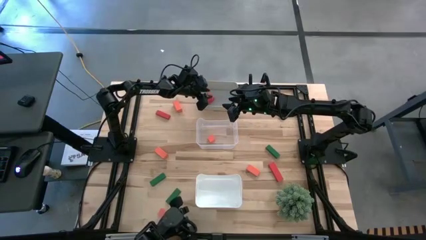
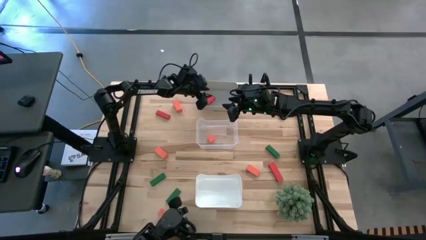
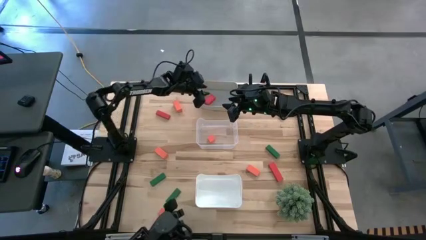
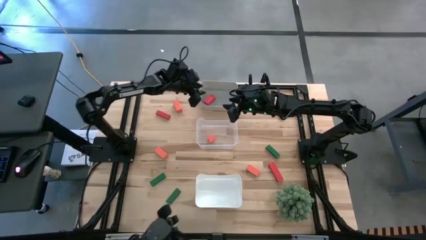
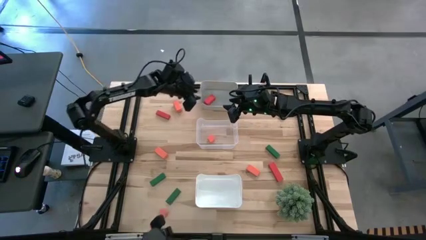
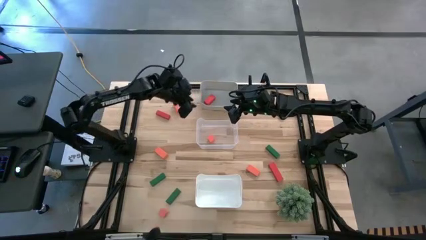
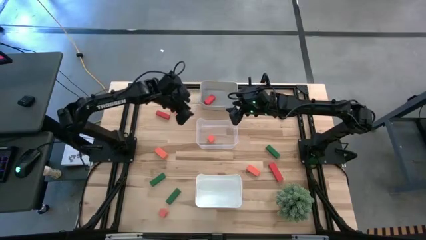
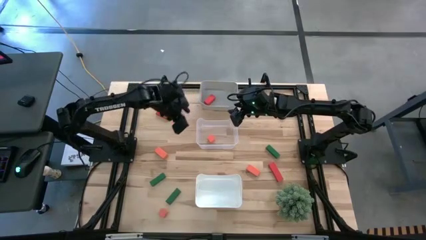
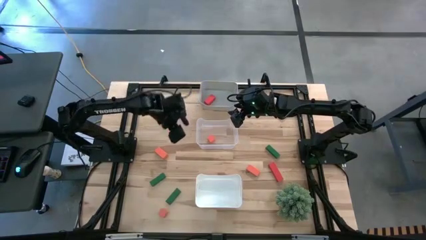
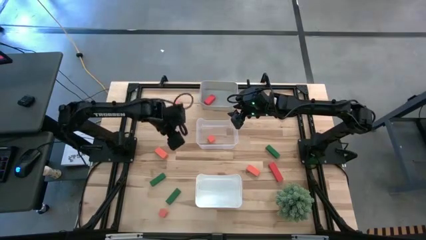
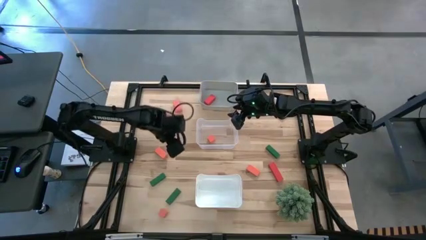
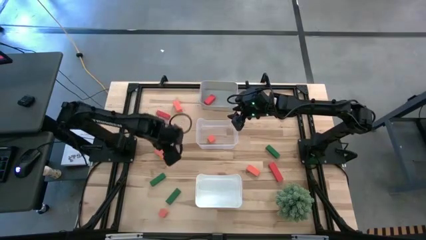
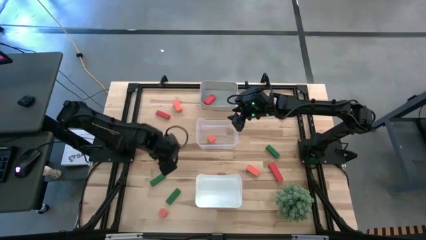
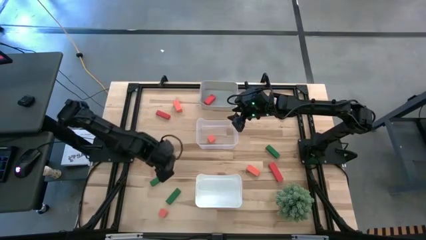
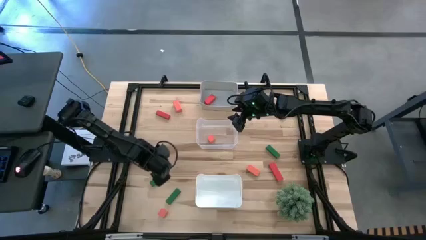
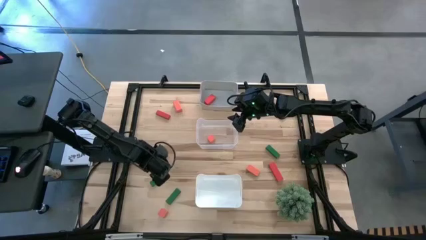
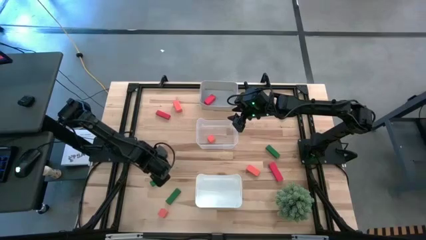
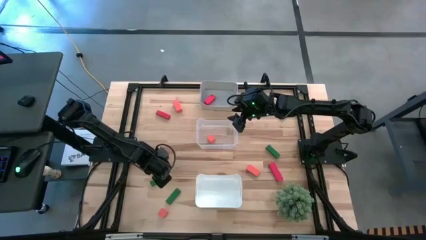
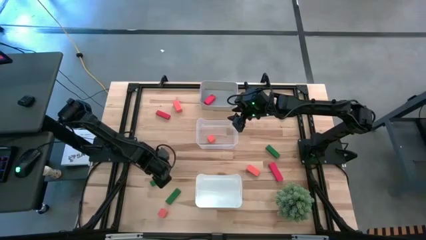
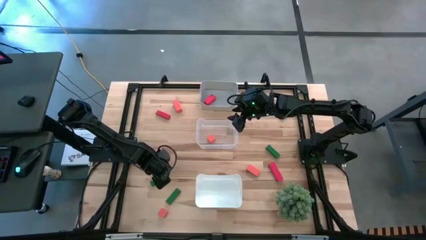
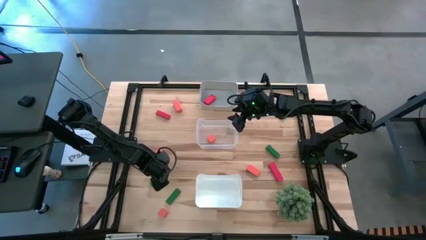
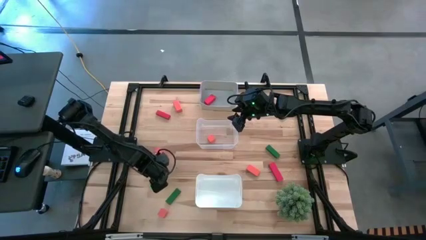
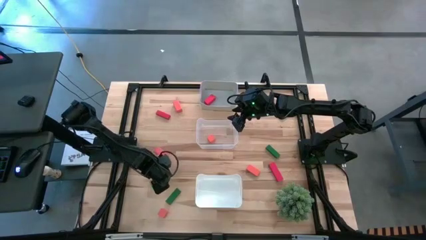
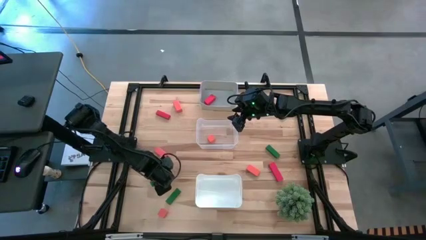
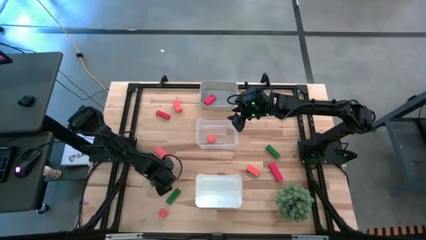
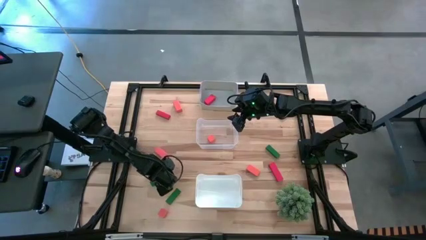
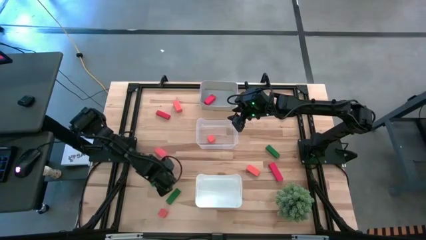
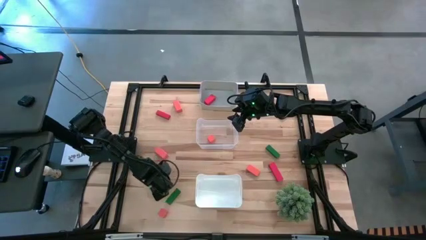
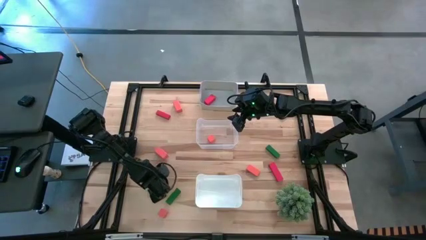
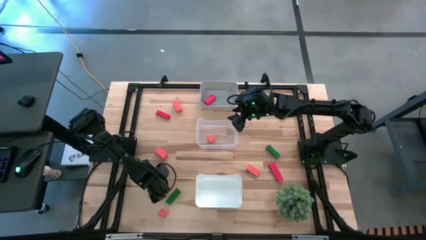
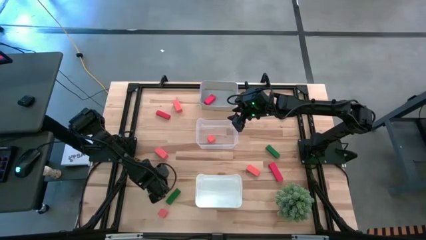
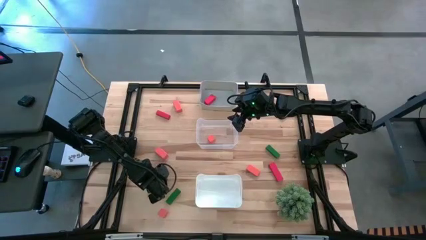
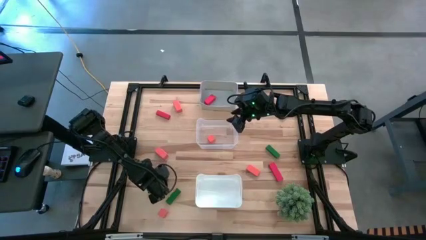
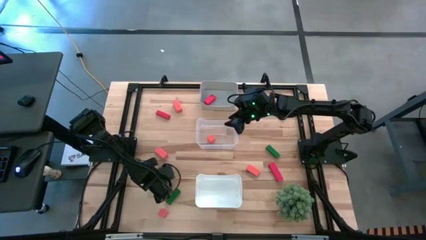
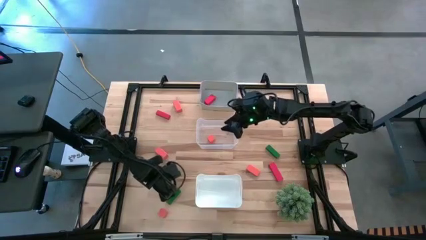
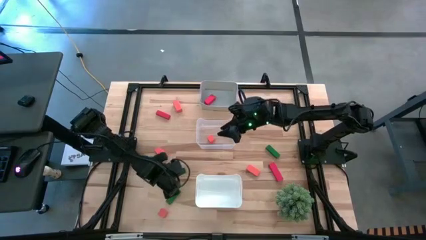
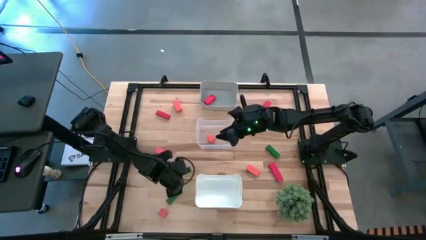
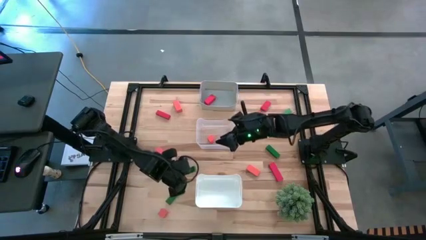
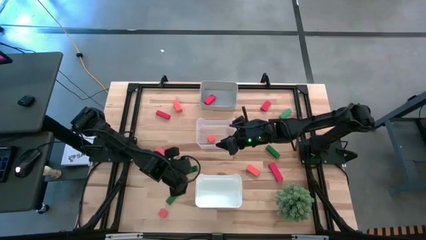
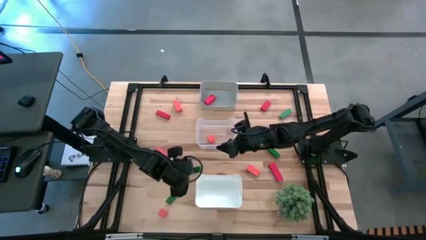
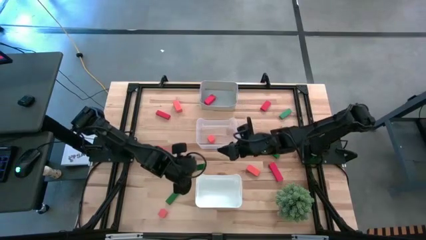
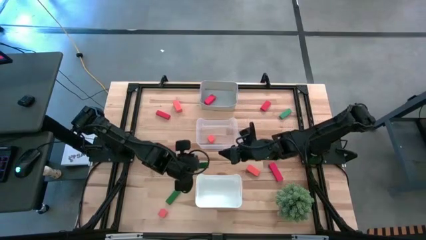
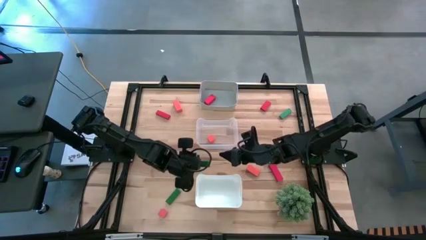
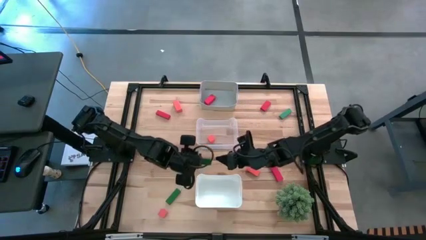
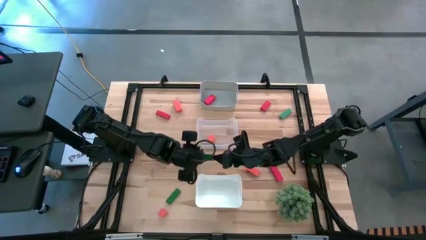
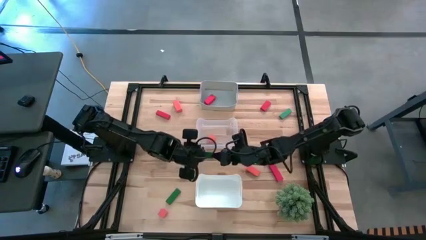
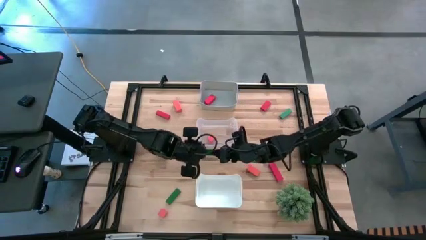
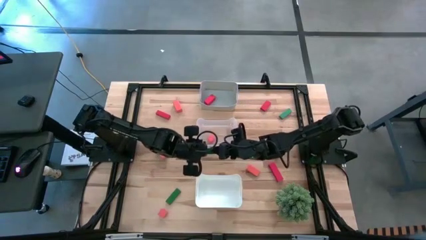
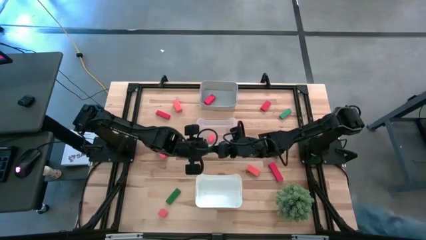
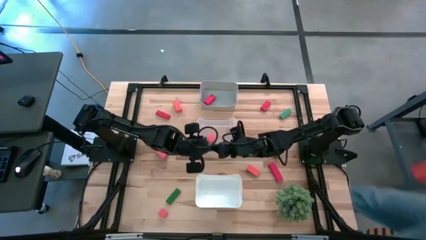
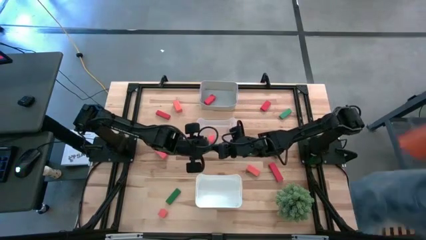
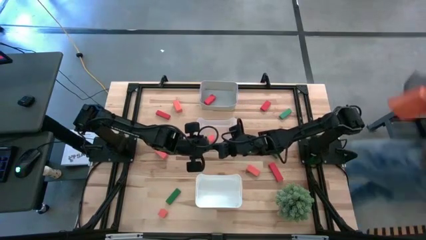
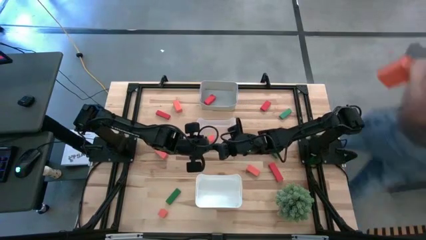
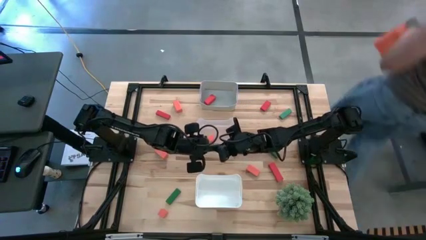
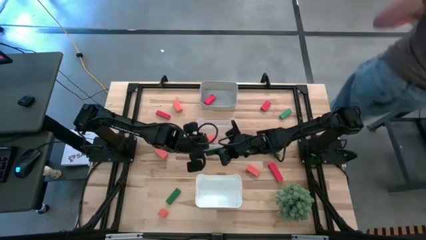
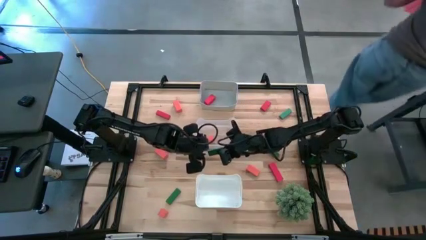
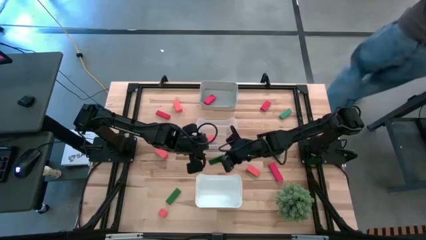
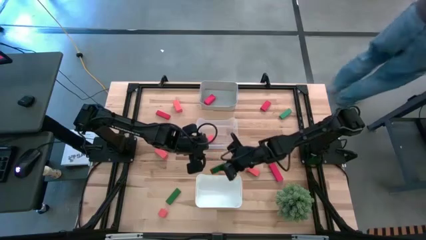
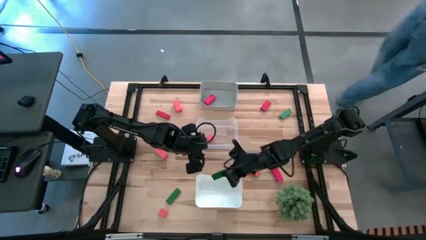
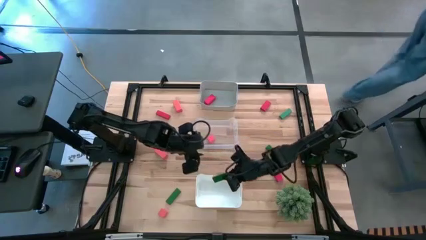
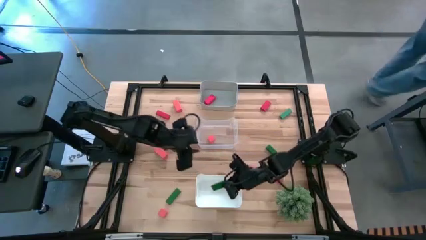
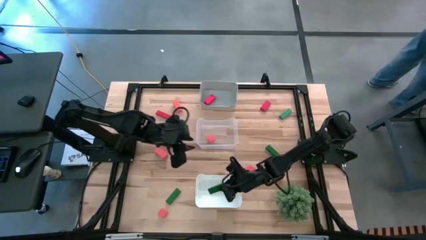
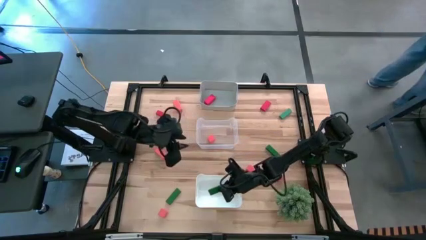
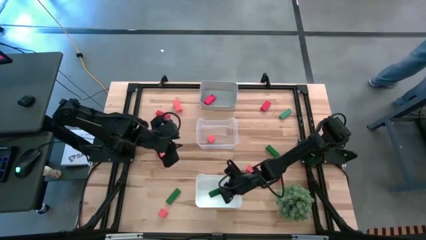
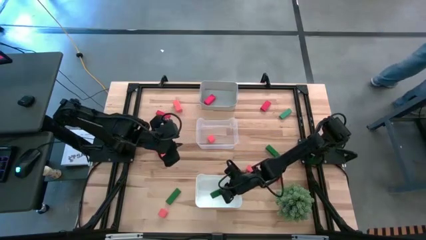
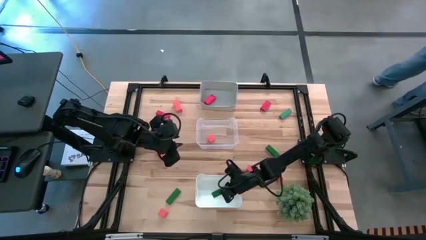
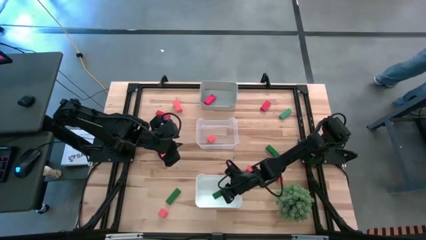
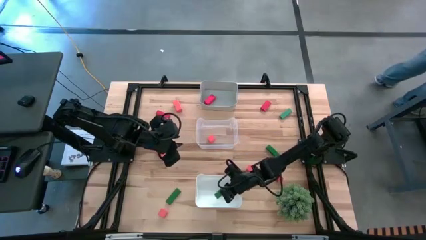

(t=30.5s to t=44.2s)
Task: Sort & place blocks by color
Put the center left green block into the white bin
